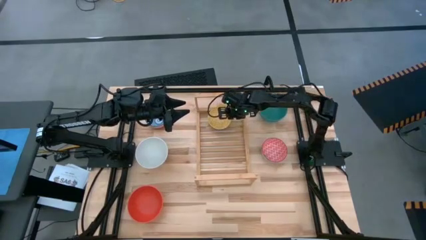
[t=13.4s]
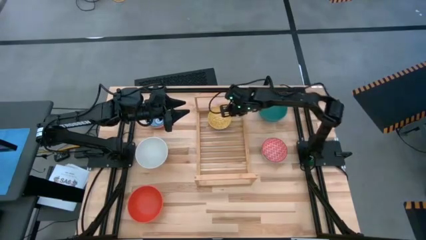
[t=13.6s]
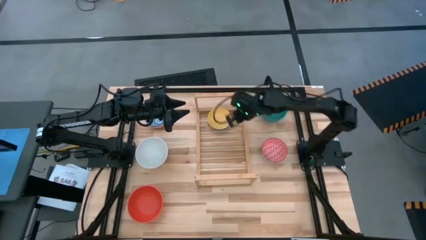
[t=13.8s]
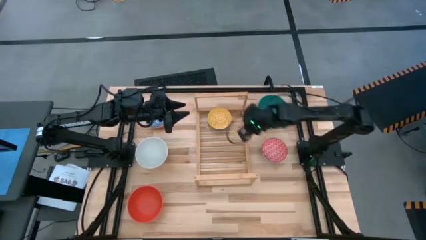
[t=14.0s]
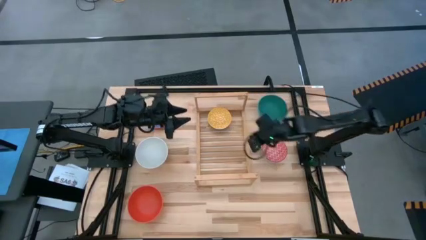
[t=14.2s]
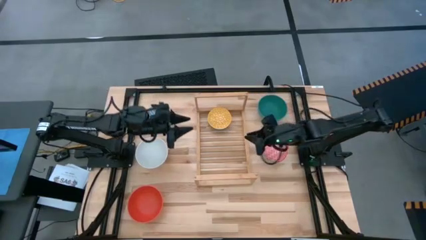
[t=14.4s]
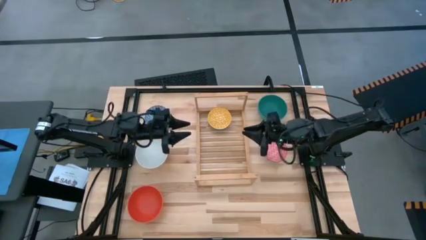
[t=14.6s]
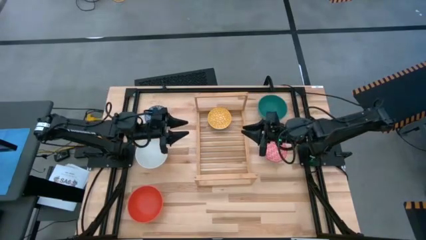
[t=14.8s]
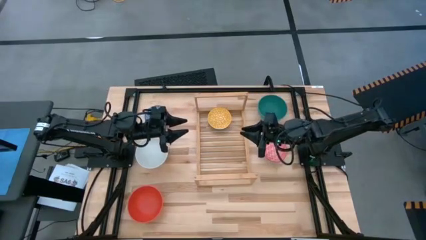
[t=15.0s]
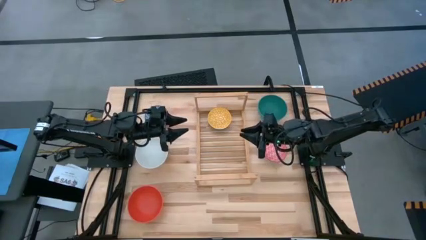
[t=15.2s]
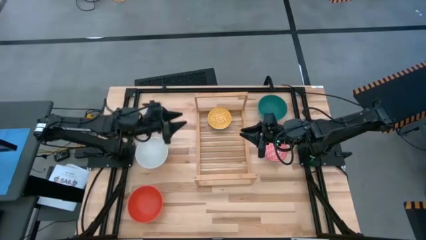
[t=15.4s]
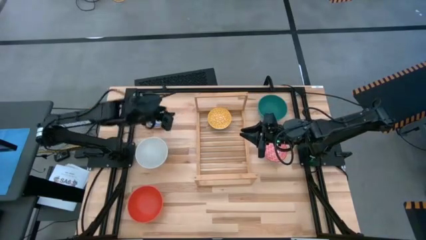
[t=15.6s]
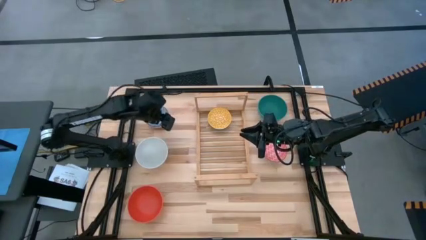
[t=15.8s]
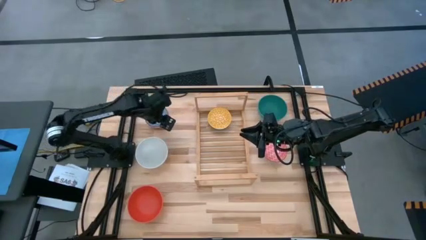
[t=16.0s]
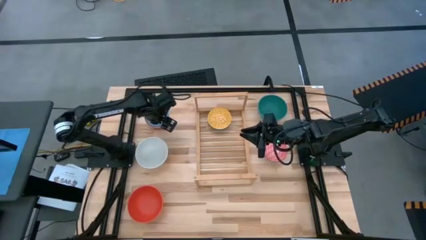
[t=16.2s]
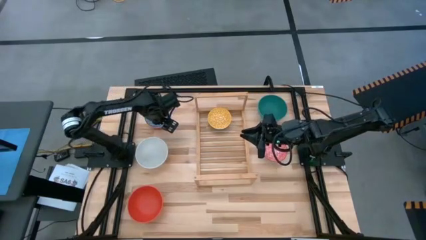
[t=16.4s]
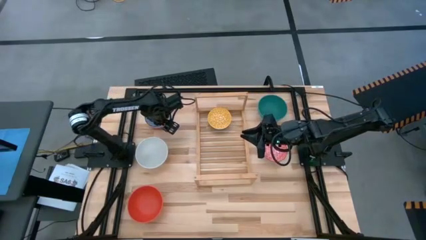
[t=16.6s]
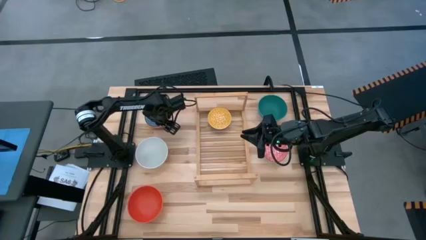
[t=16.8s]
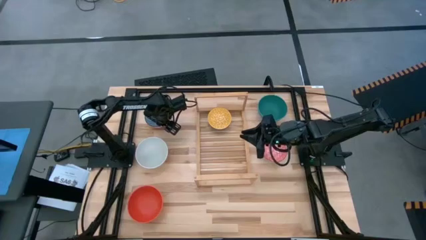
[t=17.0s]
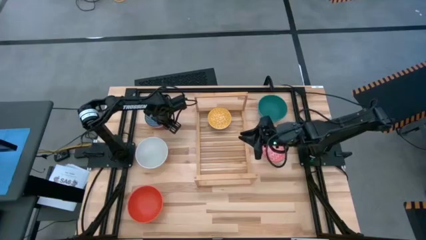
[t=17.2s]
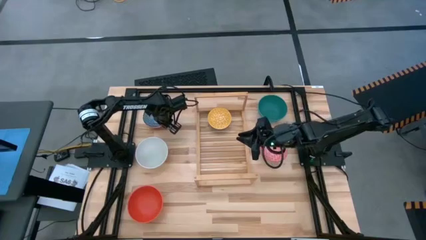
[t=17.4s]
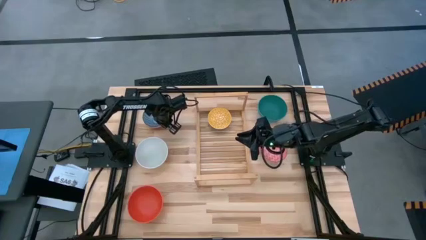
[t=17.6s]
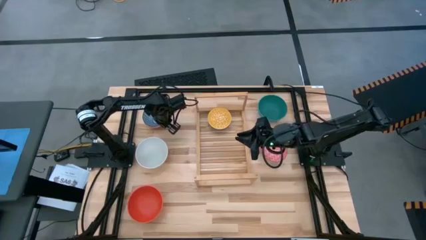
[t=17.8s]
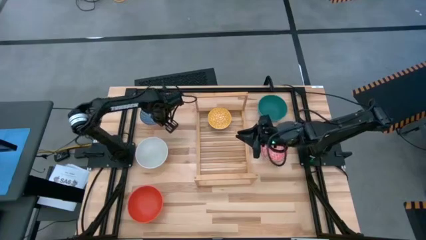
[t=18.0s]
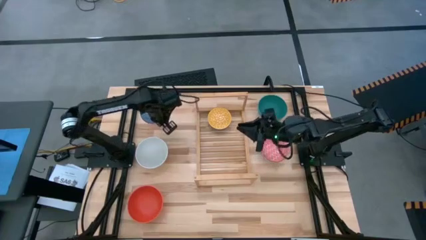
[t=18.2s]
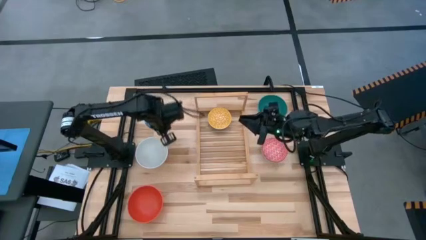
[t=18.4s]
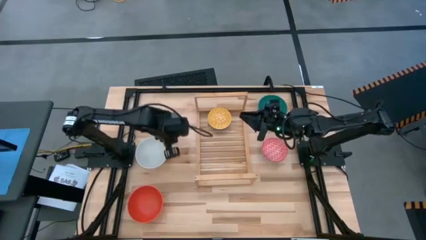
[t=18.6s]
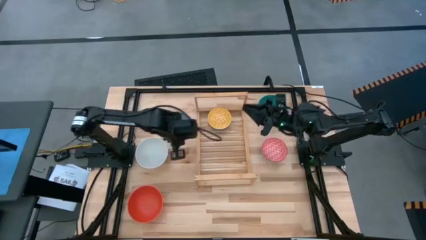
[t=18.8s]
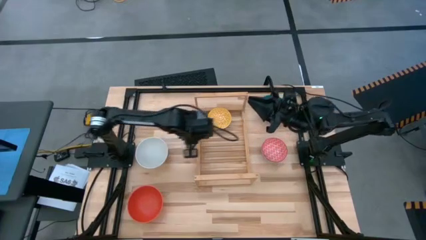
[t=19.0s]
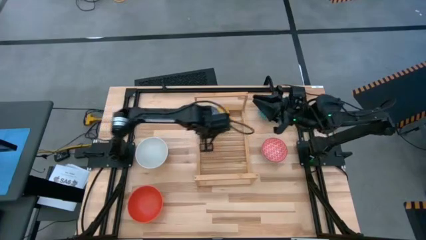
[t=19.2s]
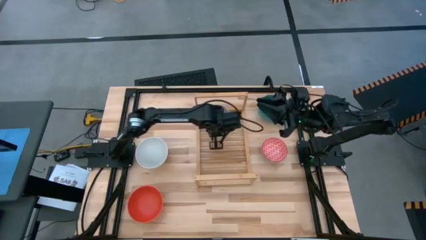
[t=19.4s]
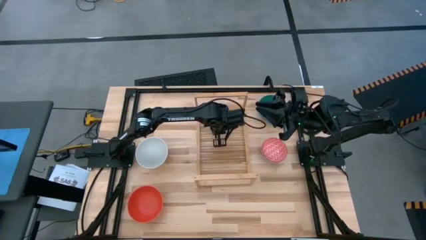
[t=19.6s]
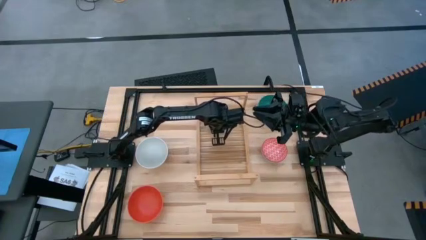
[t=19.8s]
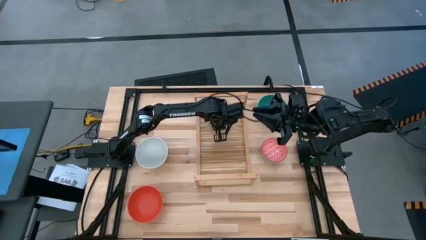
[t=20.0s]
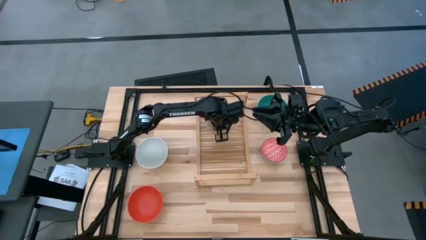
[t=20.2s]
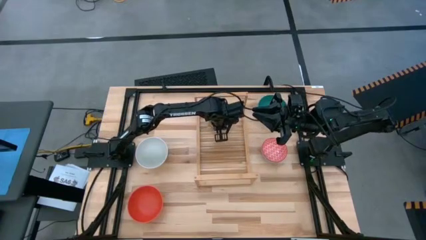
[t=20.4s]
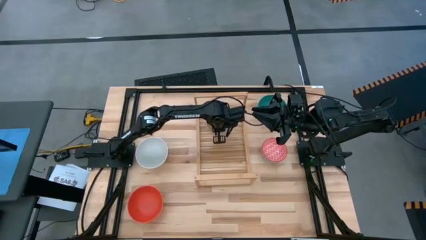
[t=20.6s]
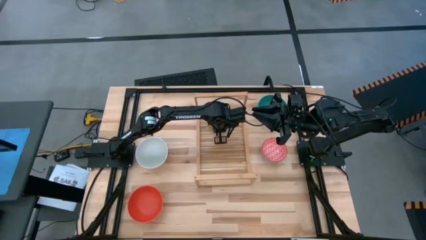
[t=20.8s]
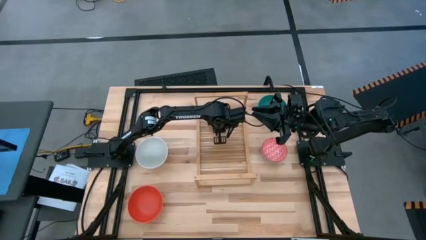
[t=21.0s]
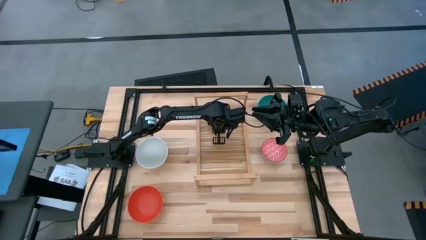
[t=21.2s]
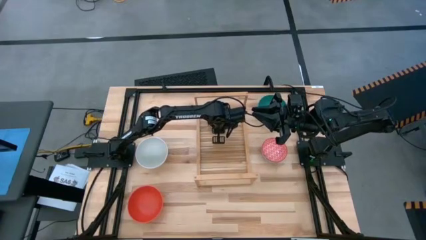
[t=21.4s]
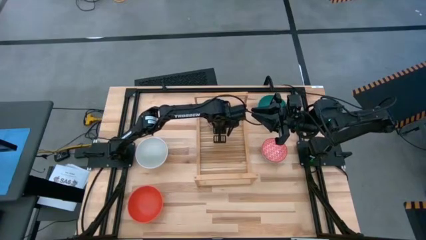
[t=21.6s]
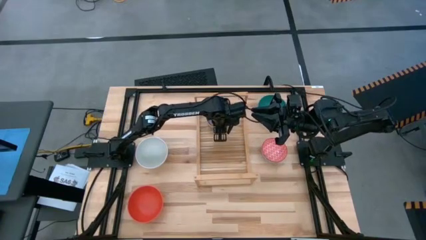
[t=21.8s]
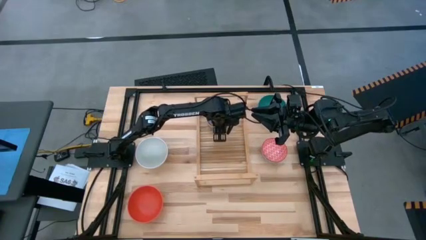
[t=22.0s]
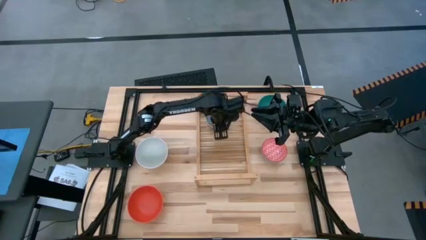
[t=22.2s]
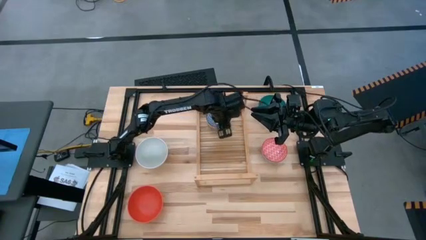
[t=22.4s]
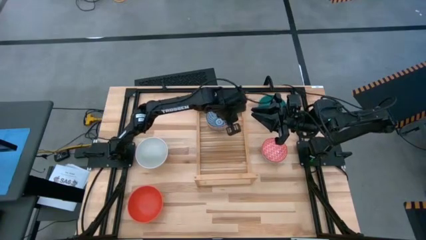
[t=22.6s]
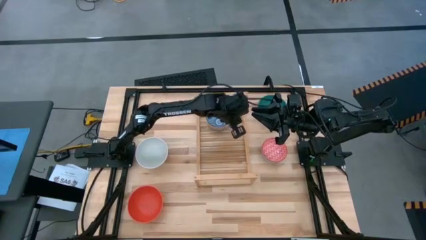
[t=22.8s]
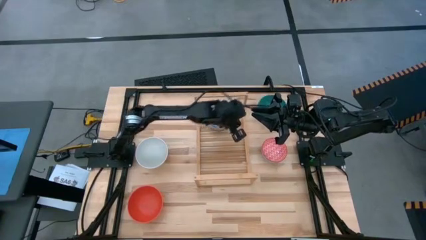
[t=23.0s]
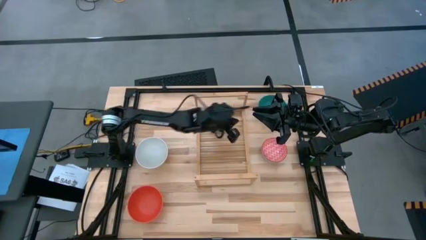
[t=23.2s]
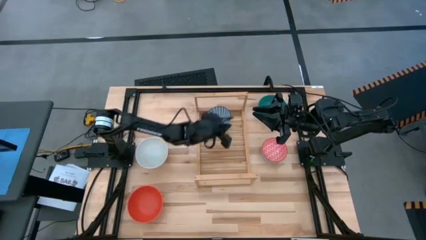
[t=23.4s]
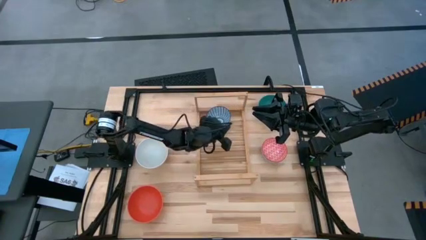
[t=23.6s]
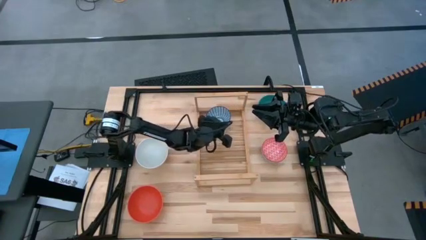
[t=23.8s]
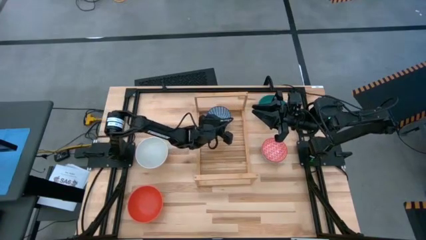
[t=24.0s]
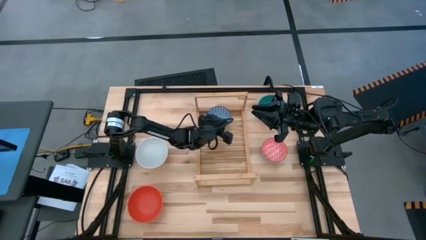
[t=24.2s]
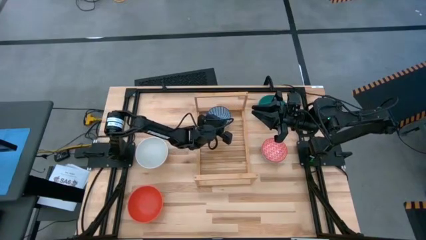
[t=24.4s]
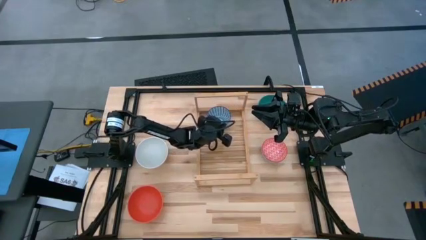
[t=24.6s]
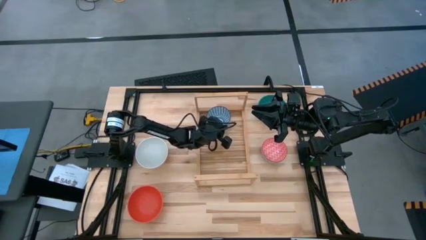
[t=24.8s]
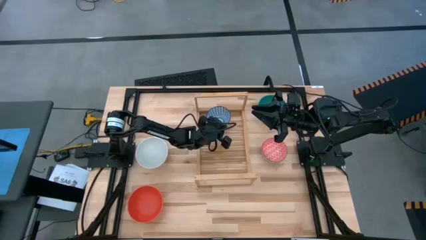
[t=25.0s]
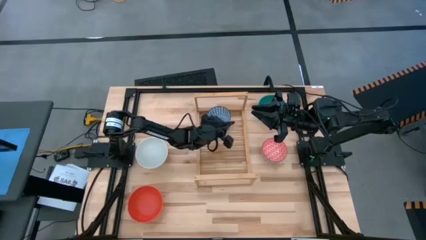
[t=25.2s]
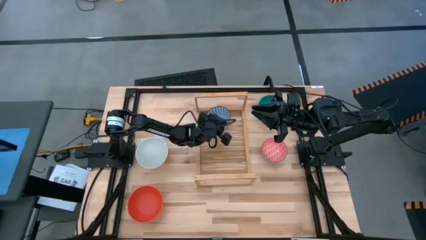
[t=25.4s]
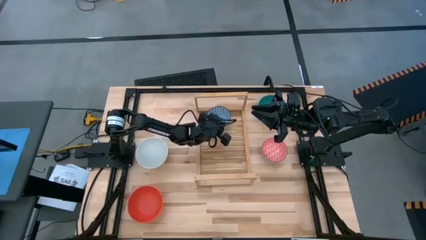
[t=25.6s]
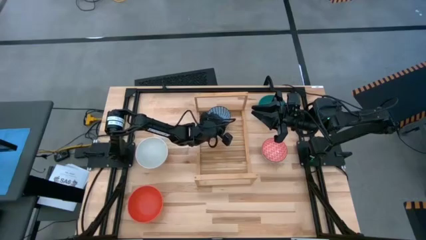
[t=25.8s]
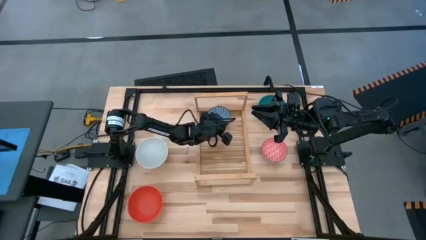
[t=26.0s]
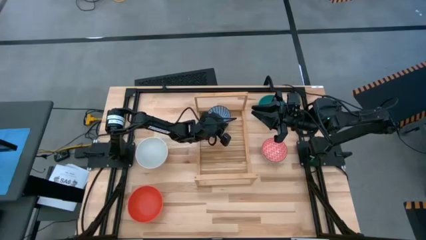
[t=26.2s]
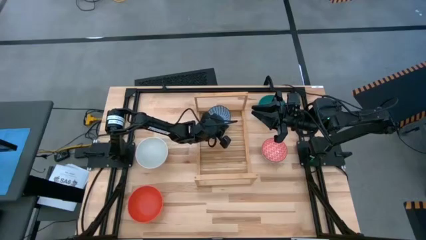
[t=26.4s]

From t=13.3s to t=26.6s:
Task: Place and stack bowls onto a shelf
Stack the blue patterned bowl on top of the yellow patterned bowl on the shelf
